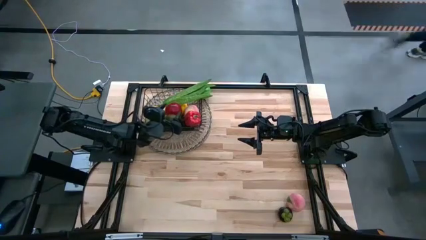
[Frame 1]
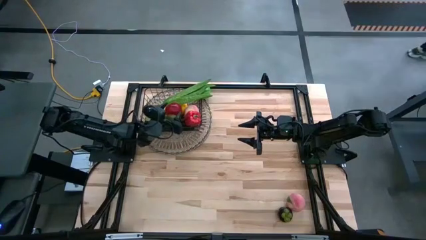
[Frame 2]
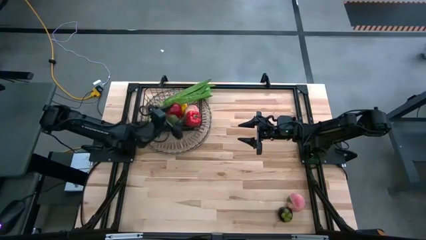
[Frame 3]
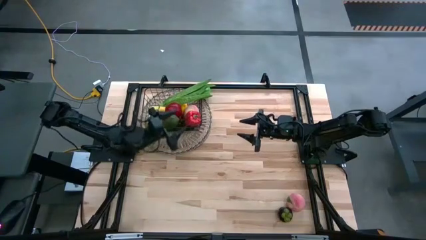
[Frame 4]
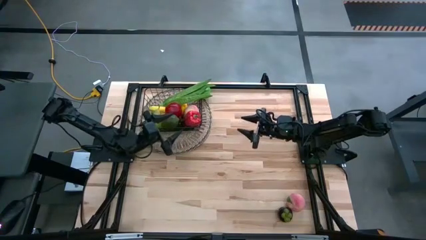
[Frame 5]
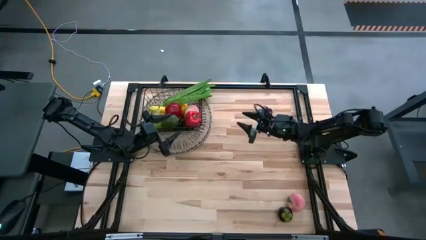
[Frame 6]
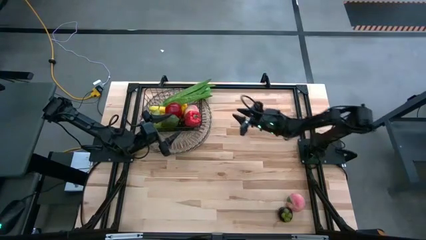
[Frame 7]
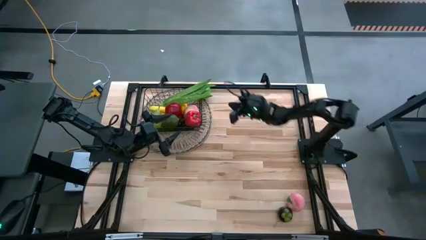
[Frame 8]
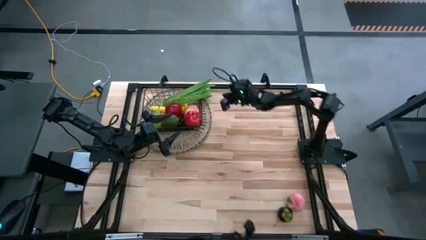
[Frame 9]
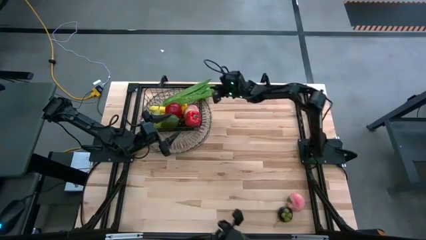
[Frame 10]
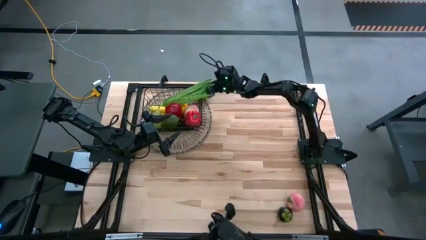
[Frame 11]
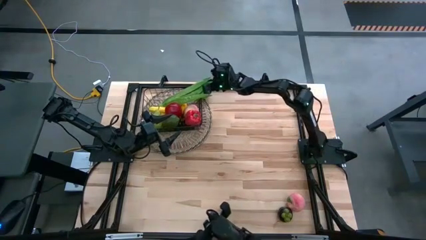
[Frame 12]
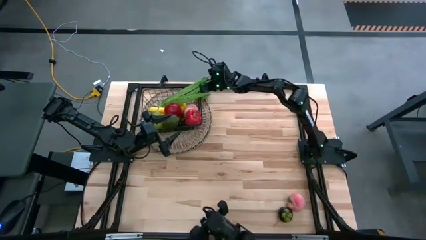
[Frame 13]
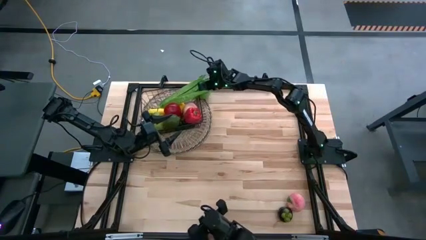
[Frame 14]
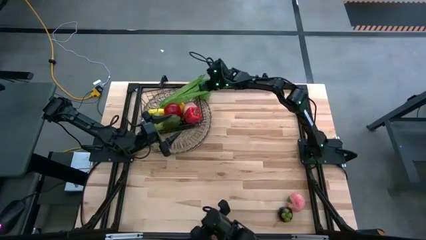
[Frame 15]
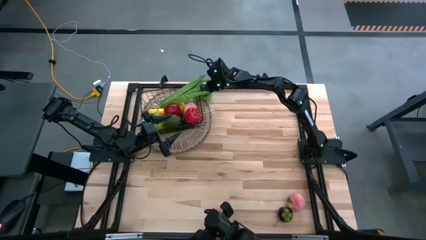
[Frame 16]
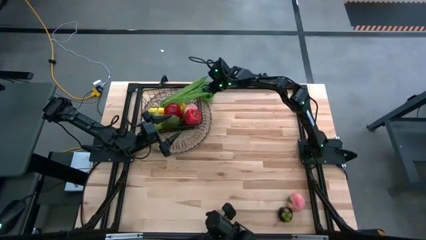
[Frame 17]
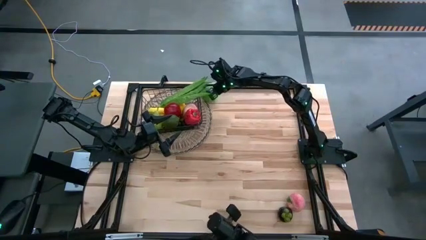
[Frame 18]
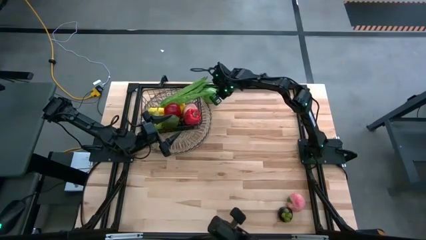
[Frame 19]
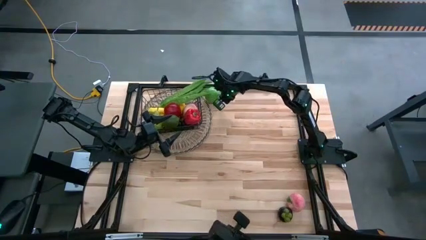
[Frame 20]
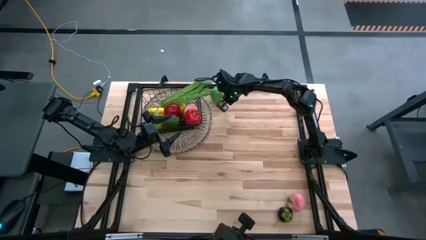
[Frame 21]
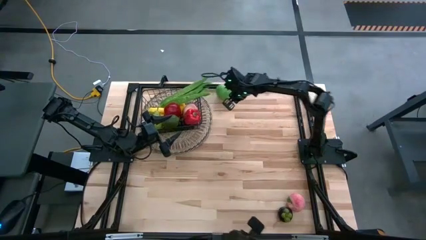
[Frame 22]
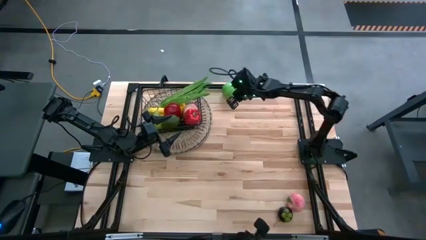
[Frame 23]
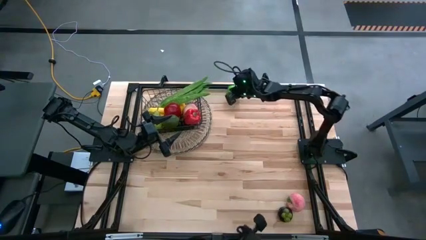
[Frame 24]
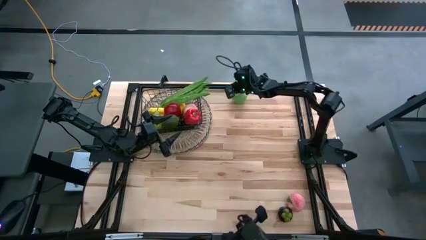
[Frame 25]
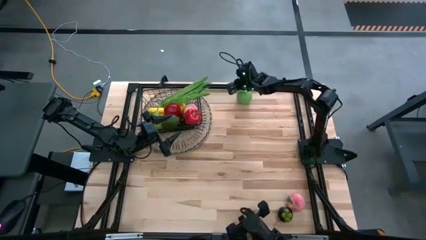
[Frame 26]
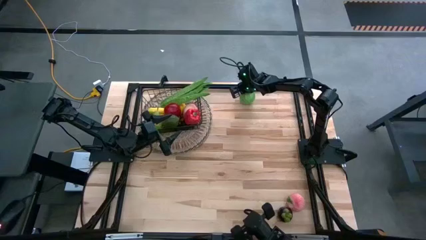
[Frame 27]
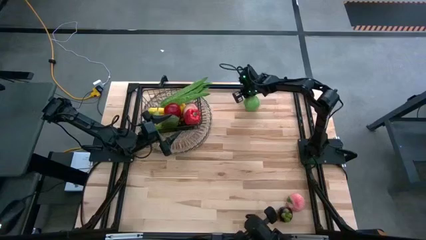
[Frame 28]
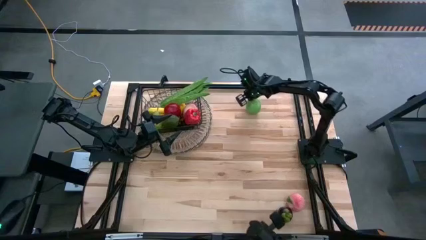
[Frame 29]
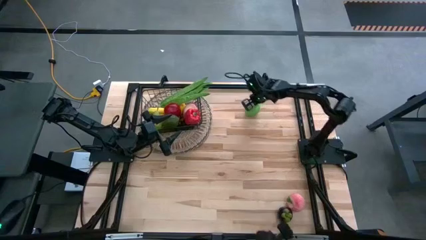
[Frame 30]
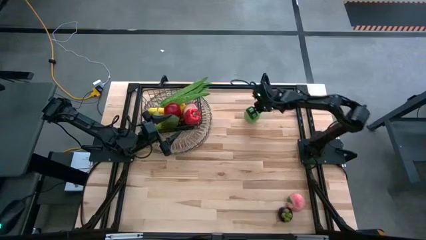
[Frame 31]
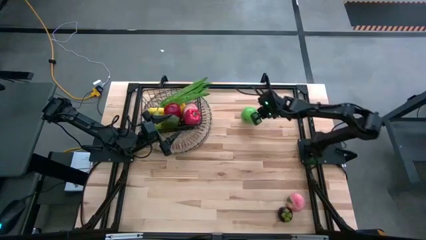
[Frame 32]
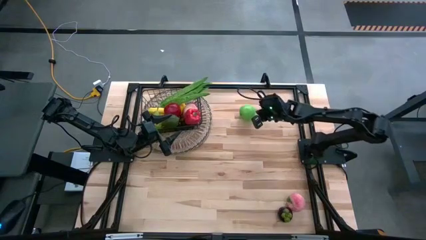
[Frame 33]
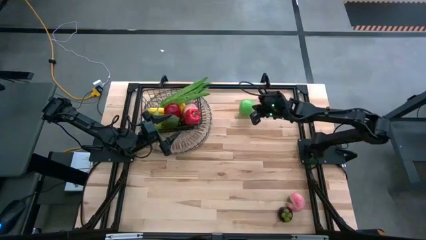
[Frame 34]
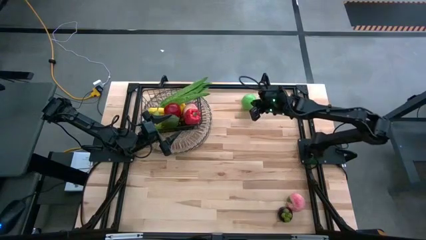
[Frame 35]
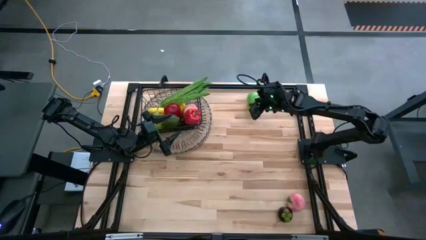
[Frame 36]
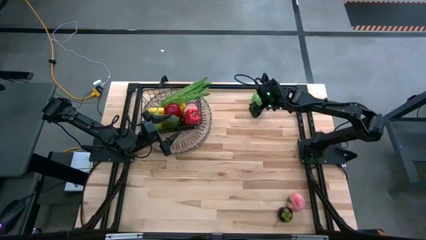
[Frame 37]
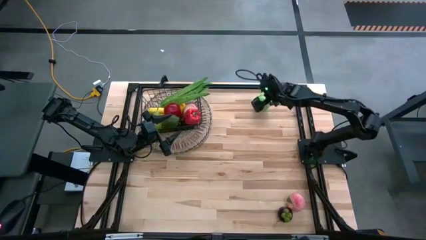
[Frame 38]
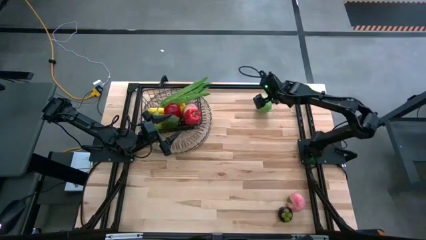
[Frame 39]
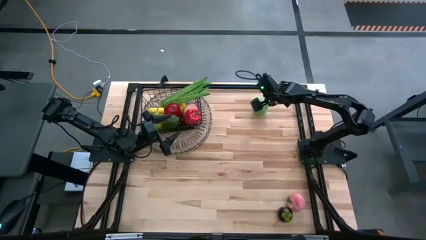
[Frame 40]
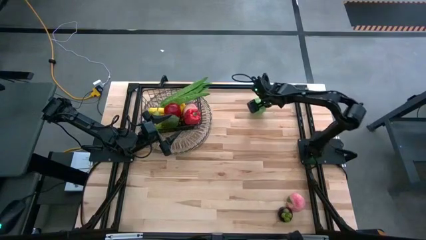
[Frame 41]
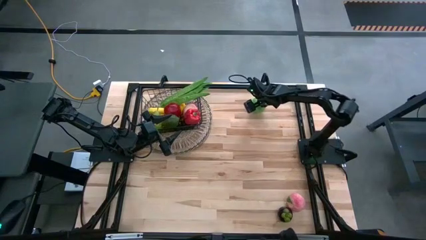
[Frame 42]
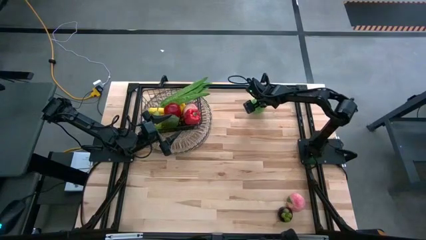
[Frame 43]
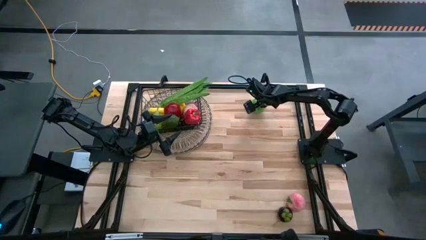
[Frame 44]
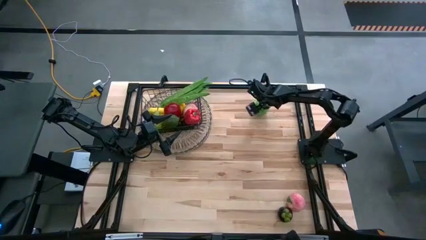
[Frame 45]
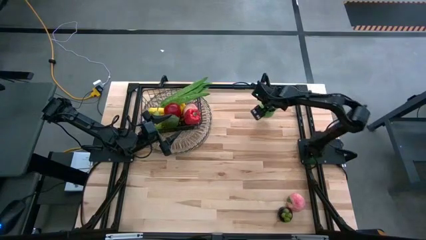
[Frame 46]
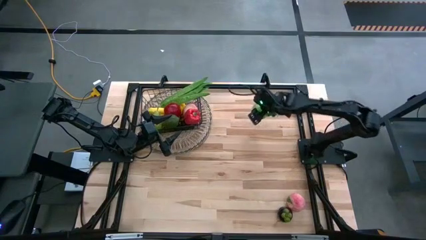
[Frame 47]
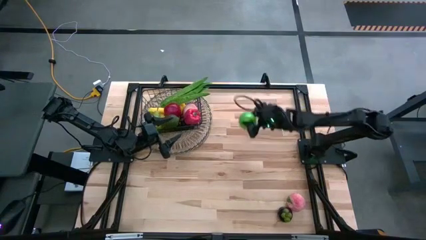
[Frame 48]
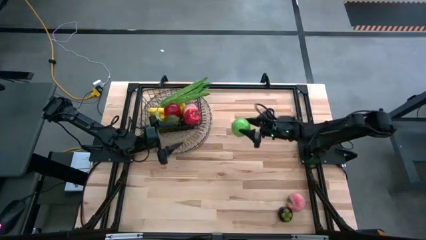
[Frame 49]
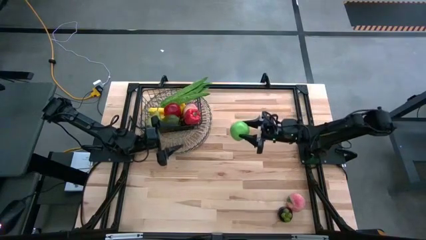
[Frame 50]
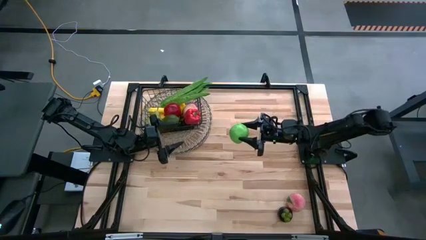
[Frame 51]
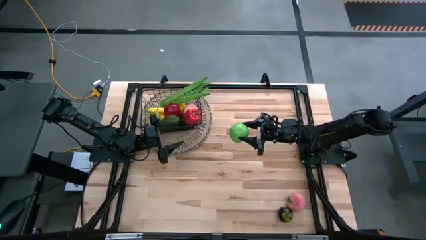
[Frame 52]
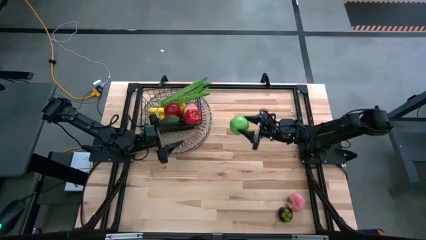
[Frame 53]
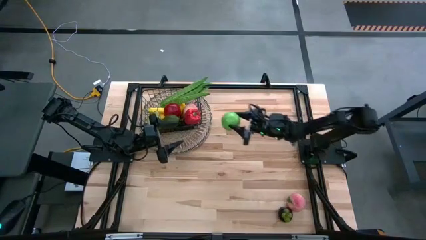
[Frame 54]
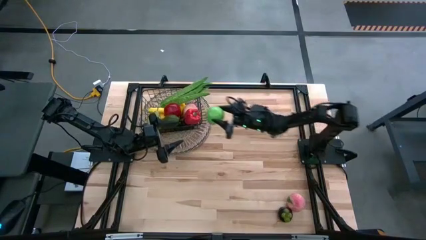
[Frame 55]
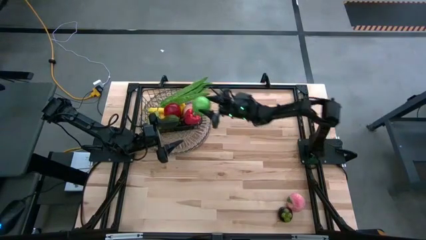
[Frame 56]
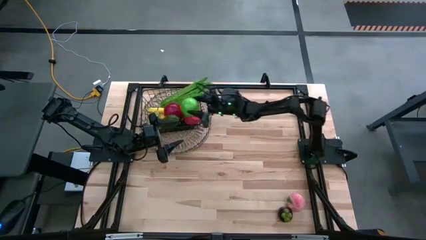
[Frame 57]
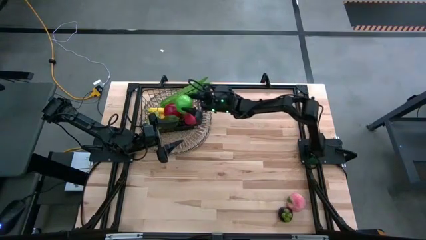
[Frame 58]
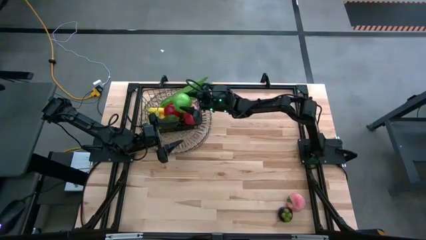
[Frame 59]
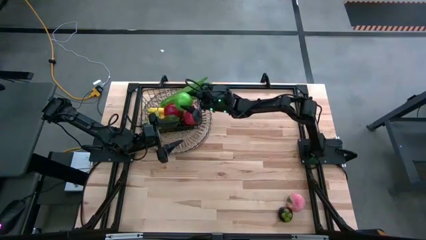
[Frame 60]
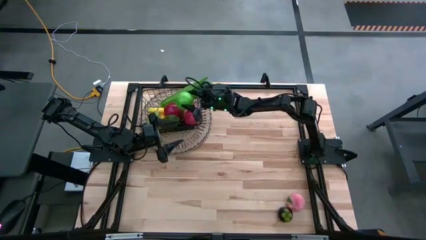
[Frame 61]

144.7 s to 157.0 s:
Task: Build produce basket
Put the green apple into the wire basket
